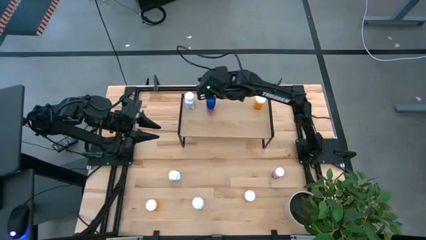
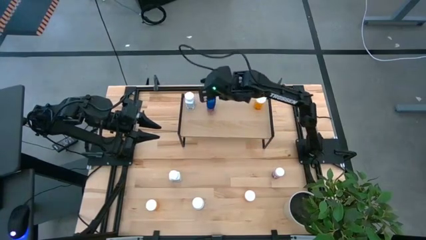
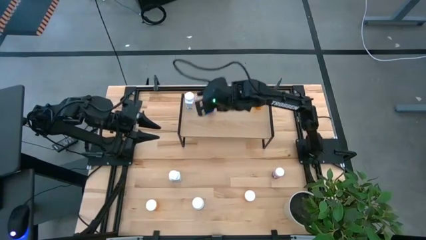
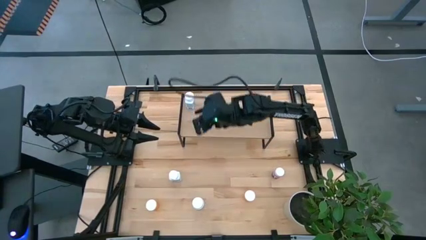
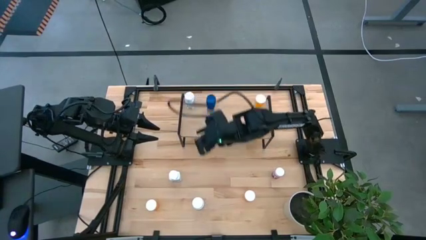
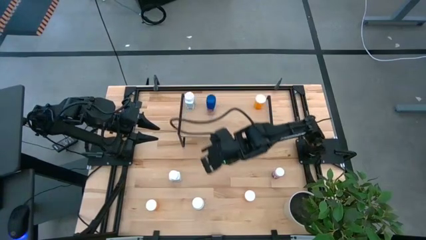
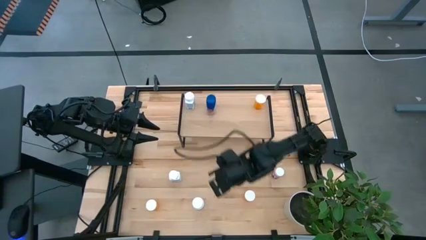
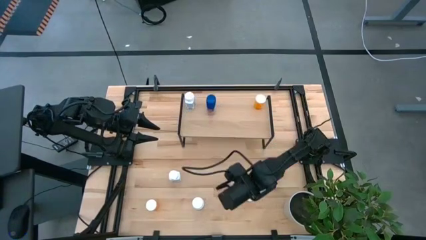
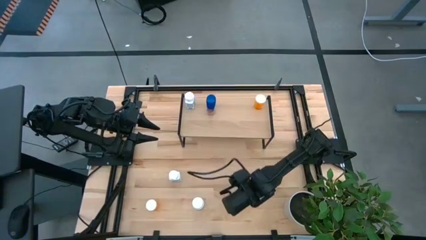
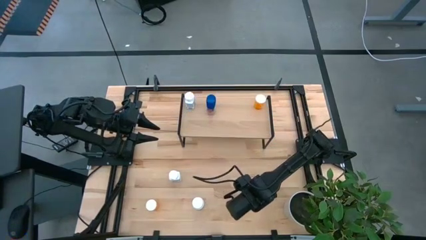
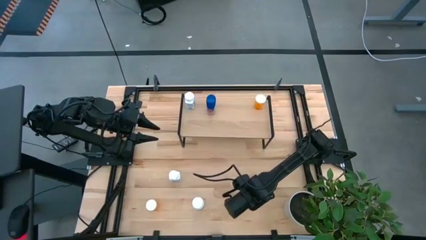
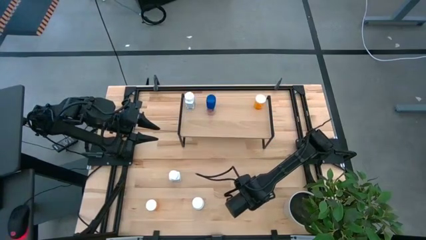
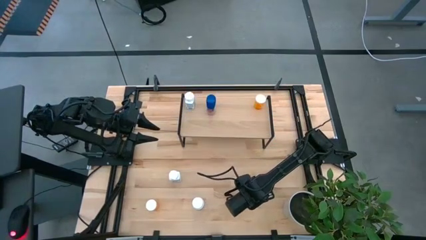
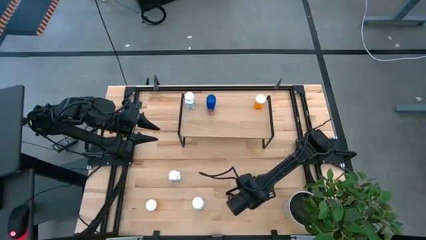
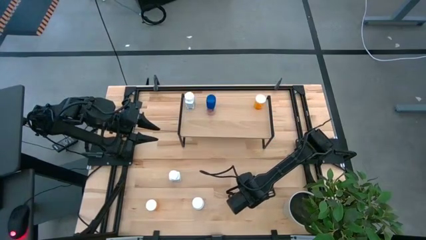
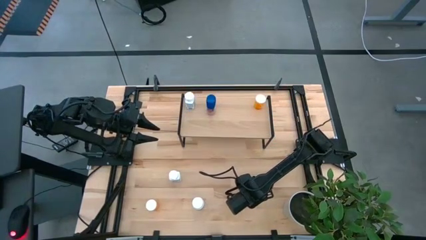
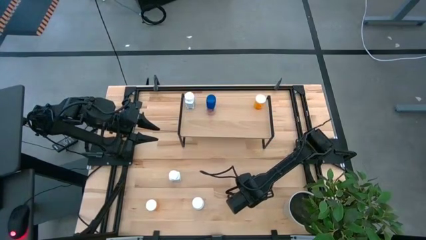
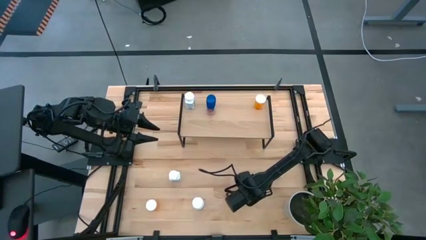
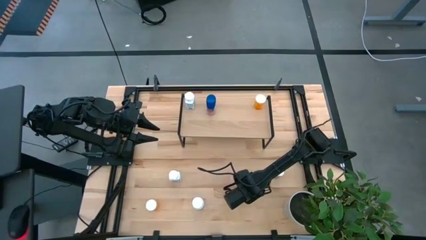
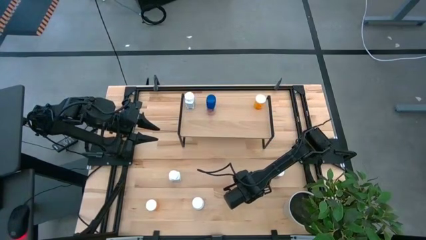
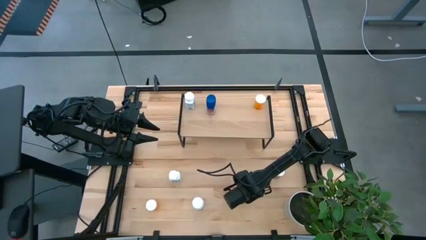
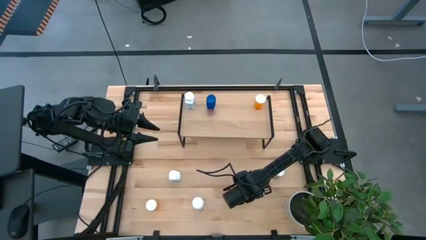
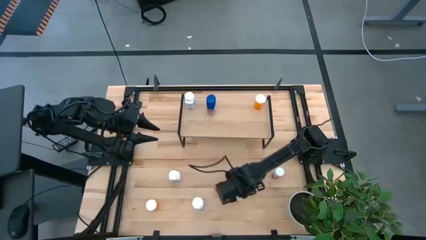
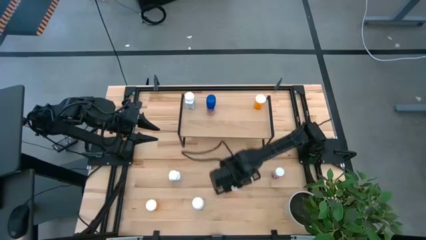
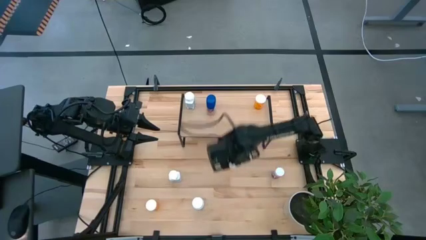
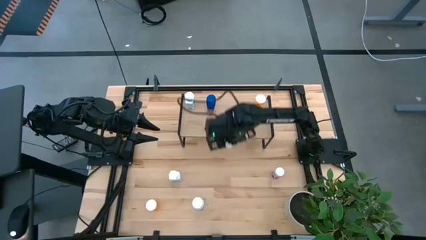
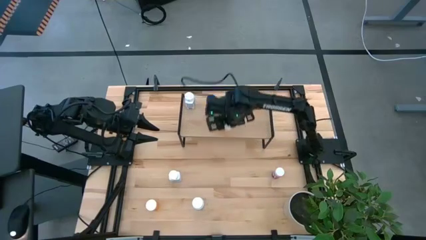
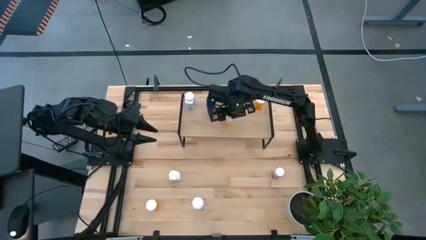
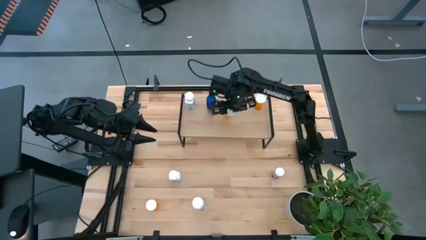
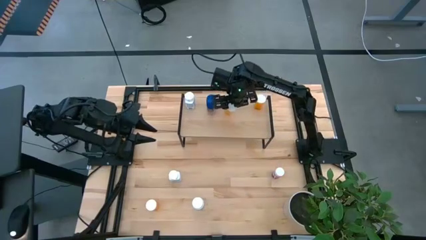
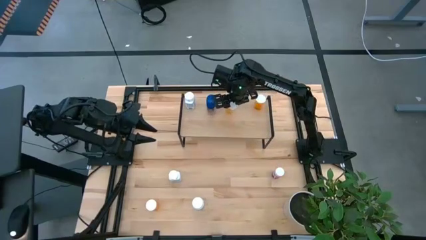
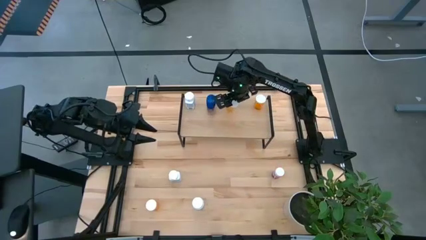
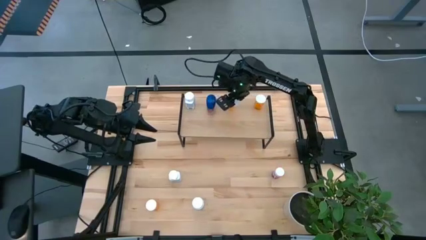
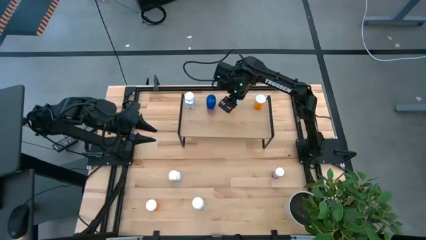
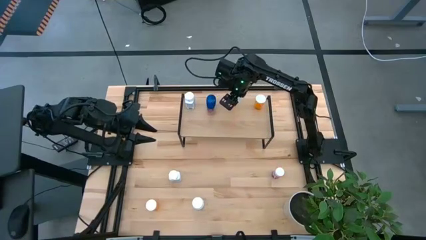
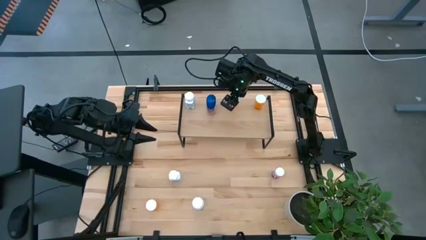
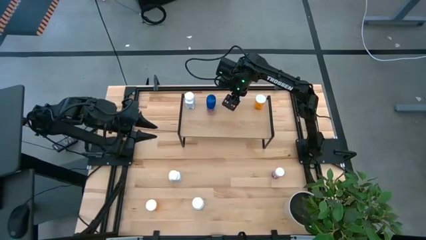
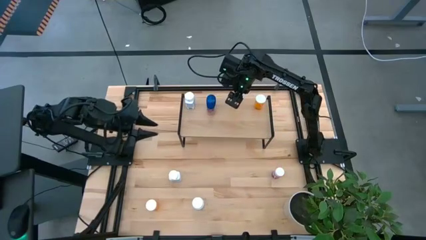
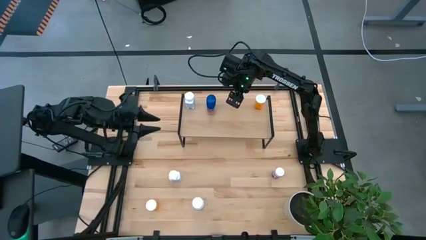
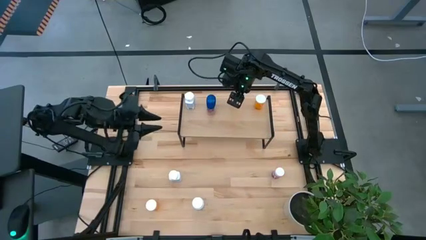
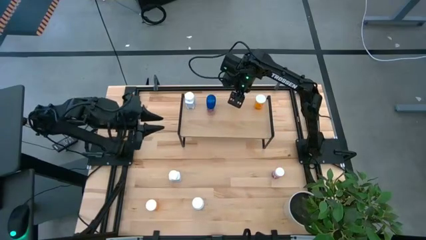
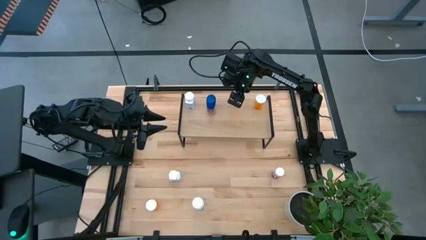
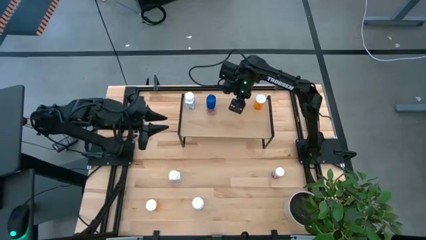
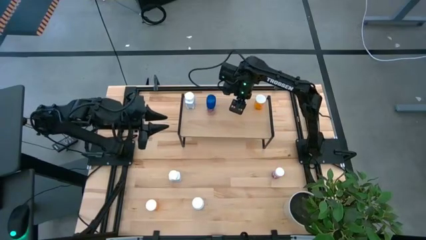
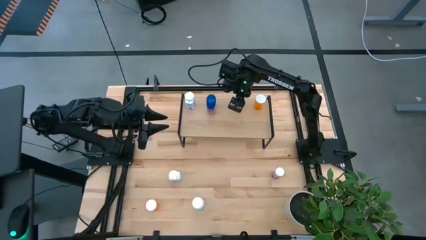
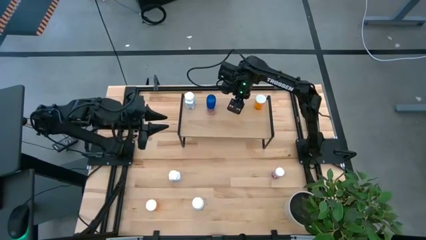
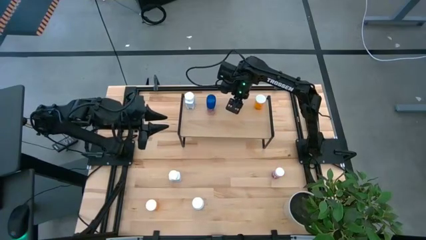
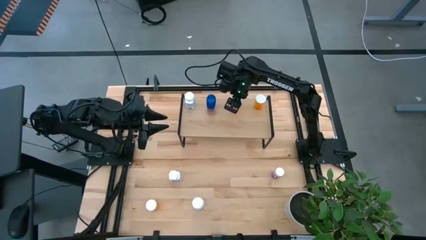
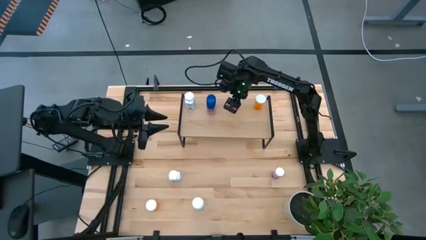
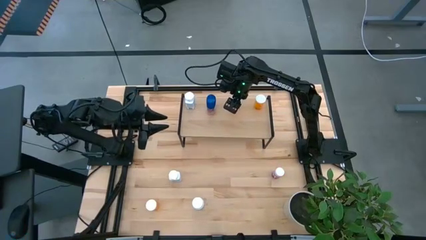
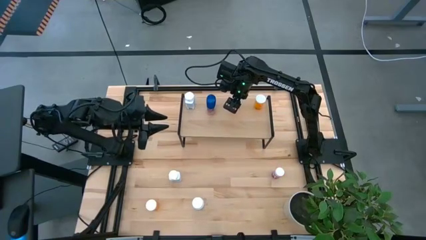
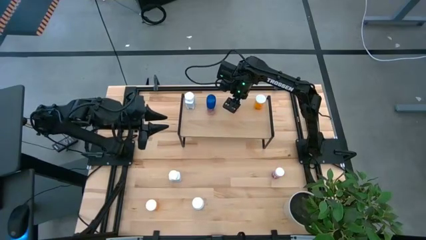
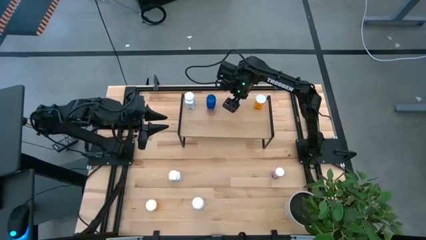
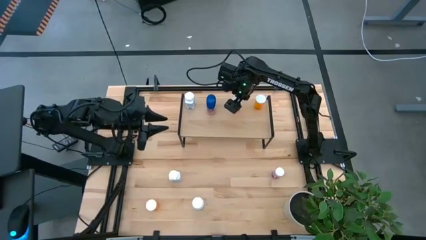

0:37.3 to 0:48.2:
Task: Pick and place medicine bottles onto shelf by color
Put the right orange pill bottle on the shelf

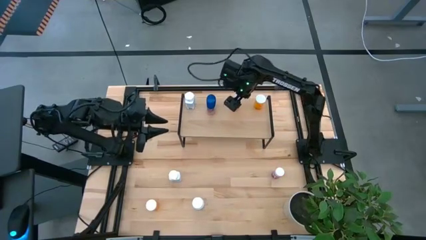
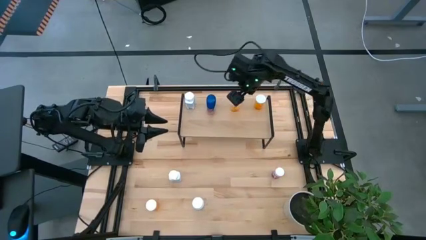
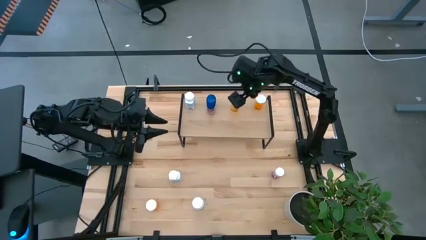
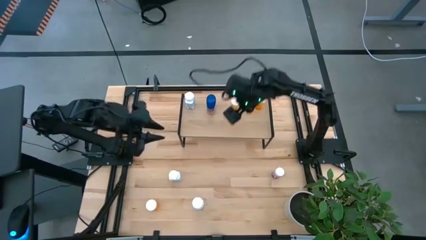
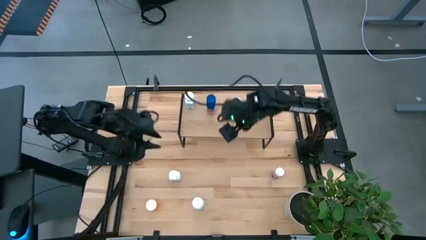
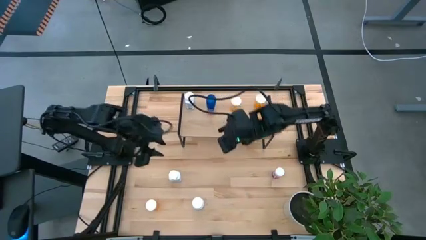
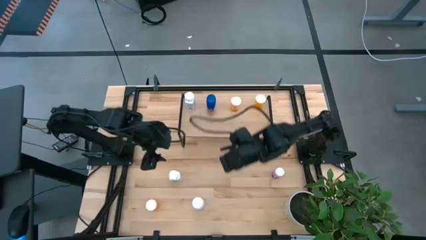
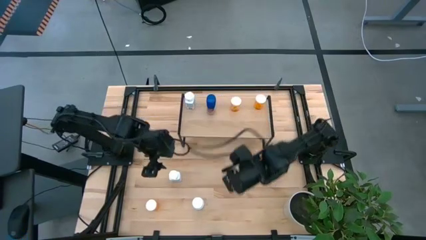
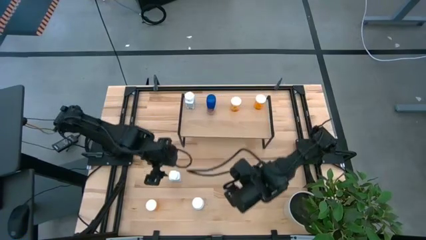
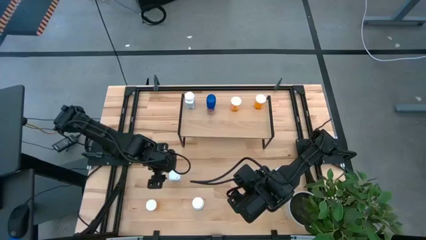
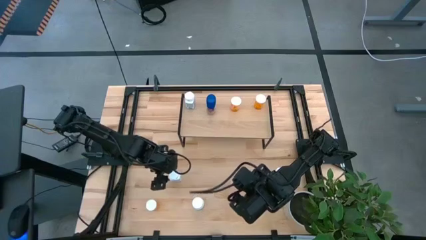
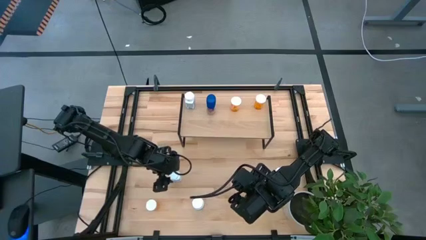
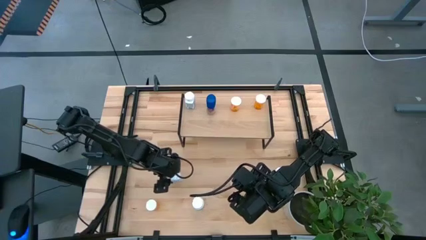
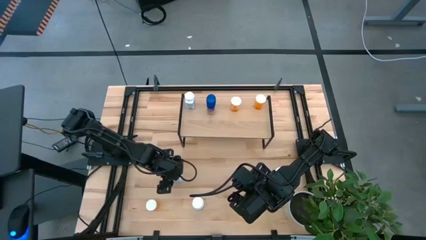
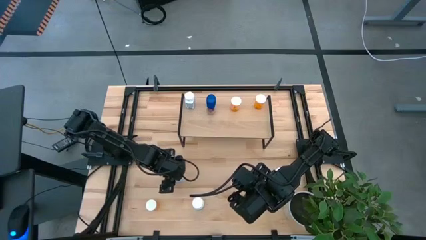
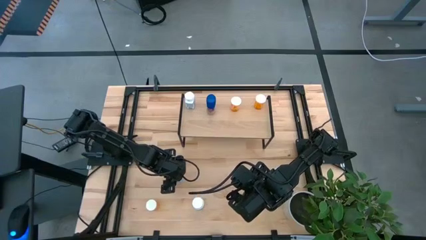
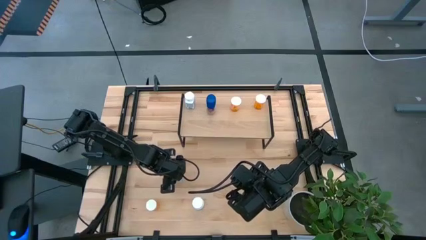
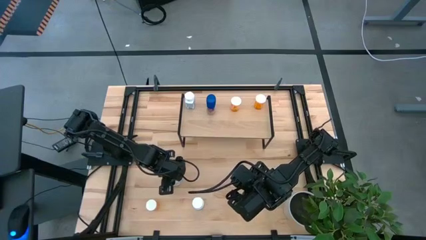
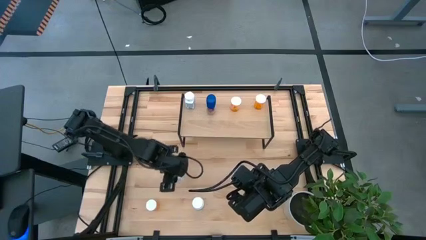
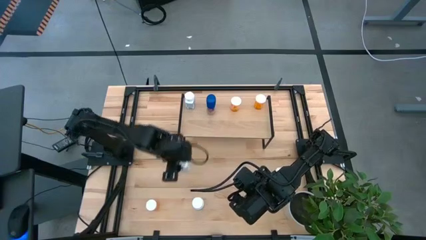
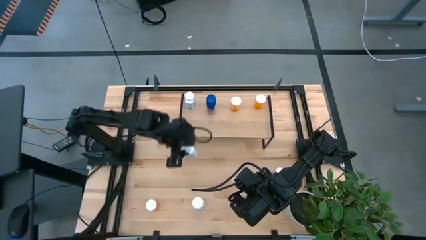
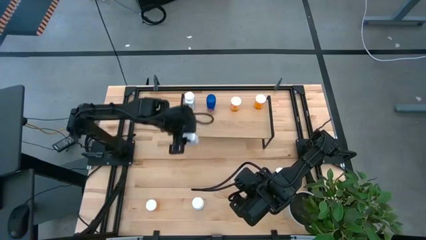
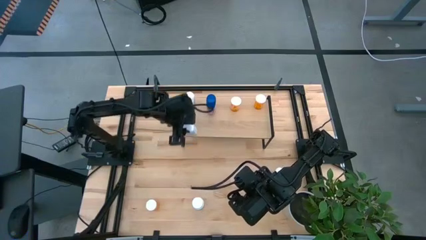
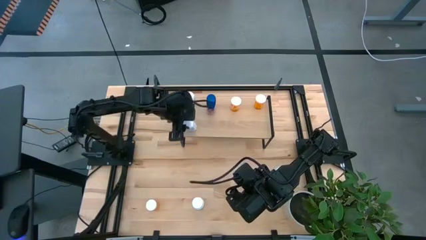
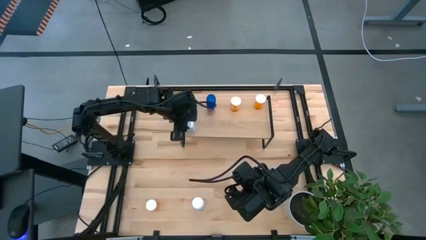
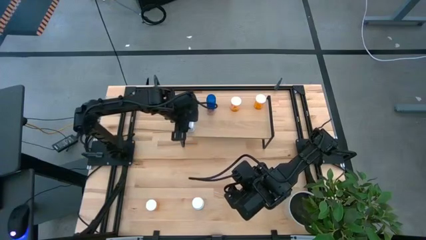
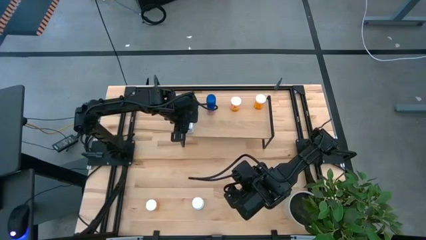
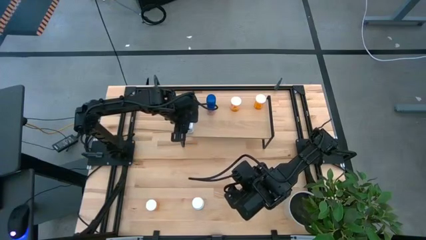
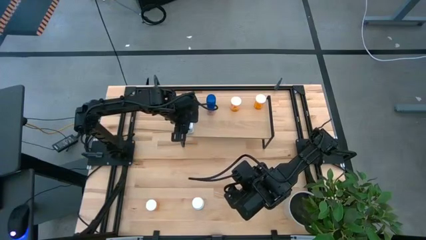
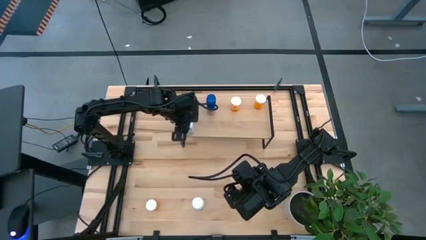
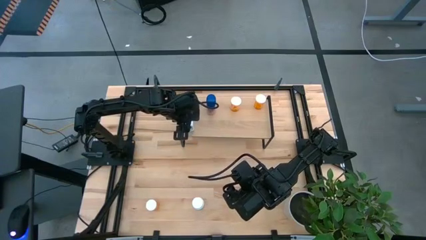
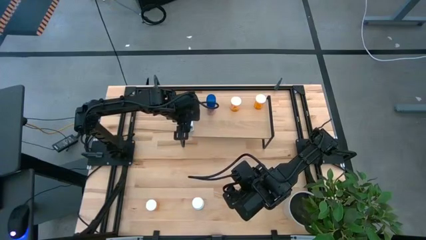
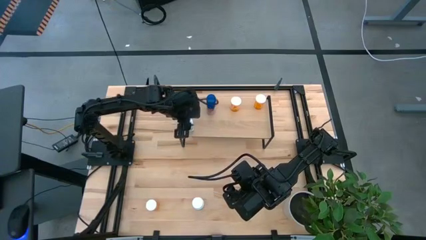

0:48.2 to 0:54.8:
Put the white blue pill bottle on the shelf
